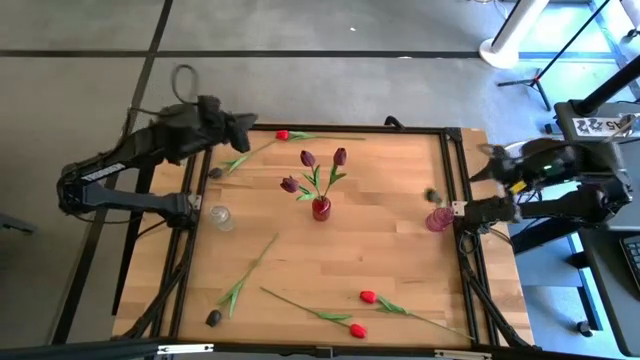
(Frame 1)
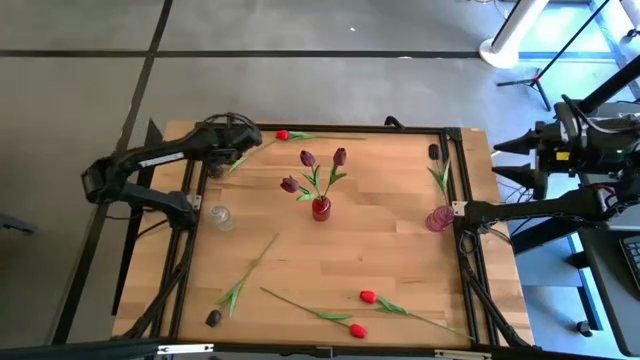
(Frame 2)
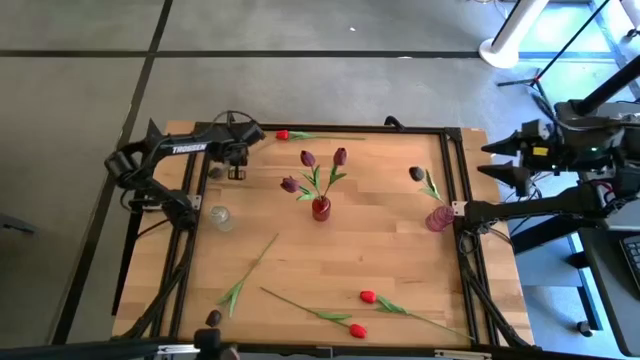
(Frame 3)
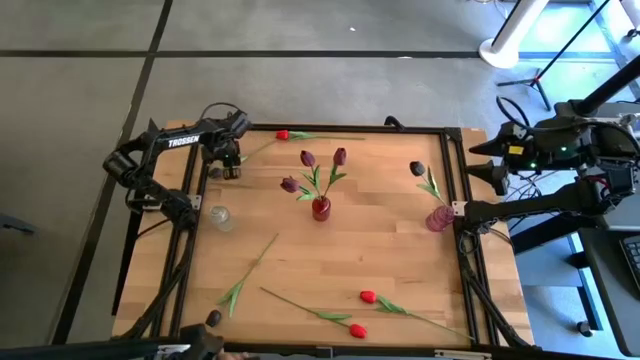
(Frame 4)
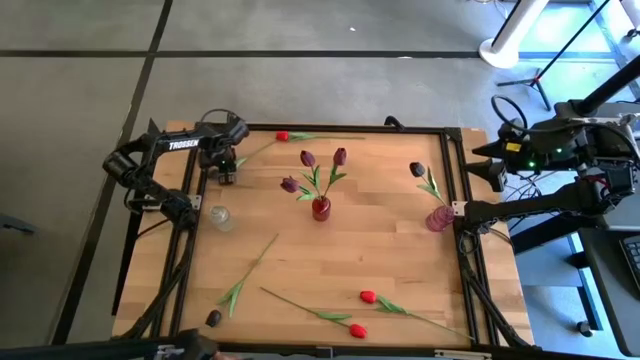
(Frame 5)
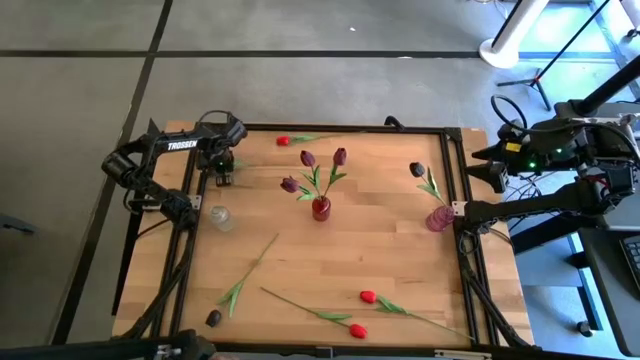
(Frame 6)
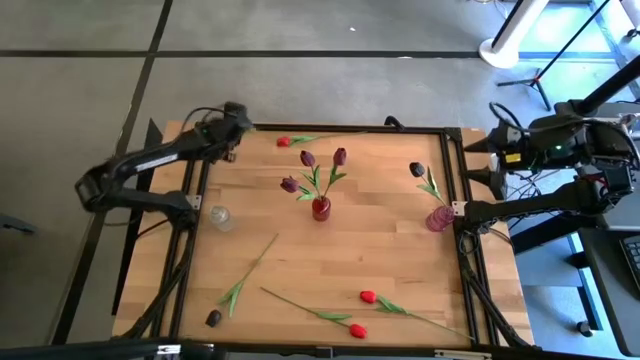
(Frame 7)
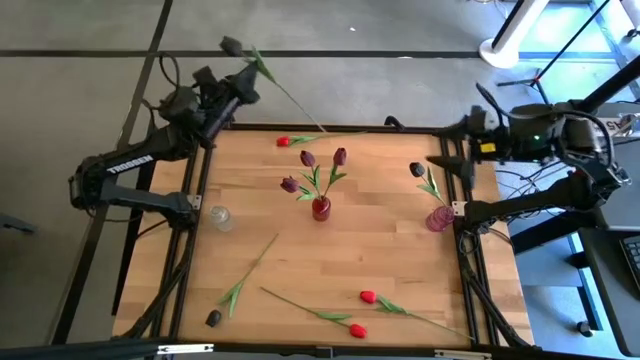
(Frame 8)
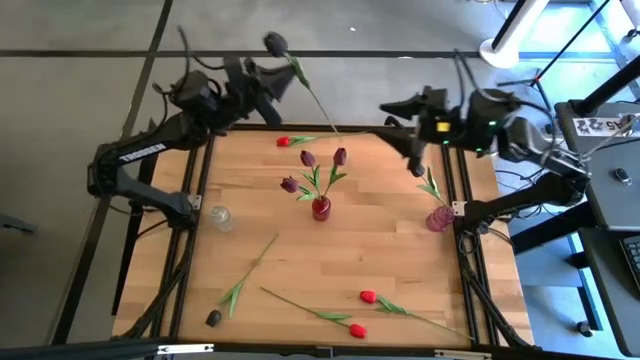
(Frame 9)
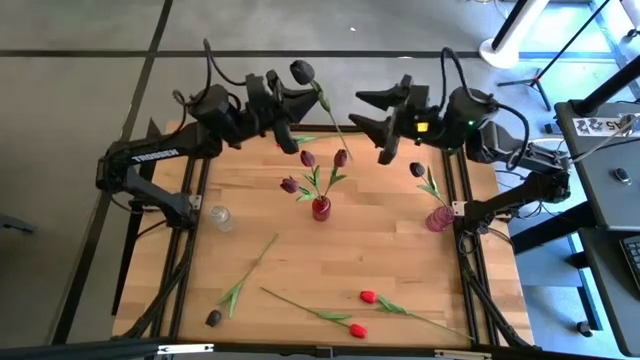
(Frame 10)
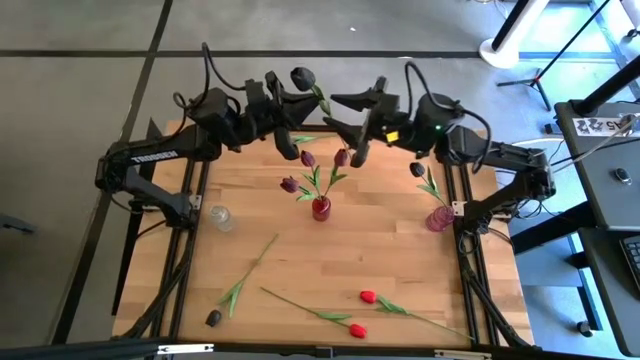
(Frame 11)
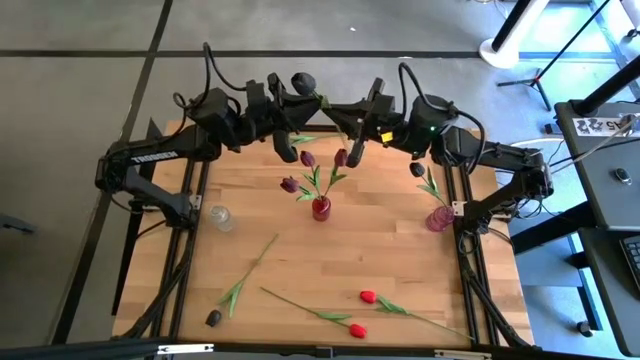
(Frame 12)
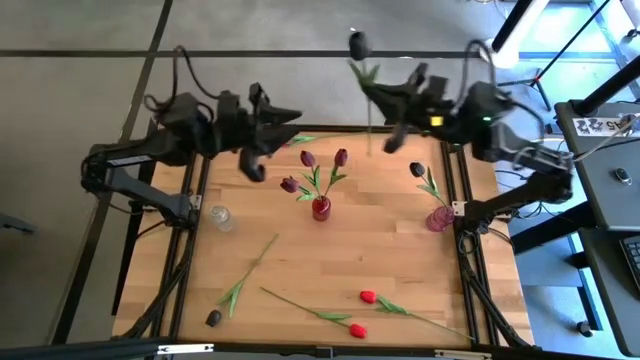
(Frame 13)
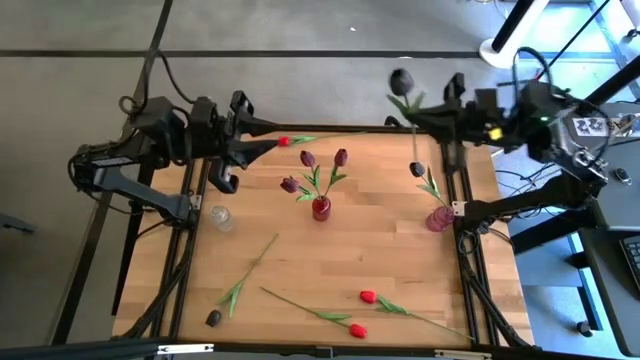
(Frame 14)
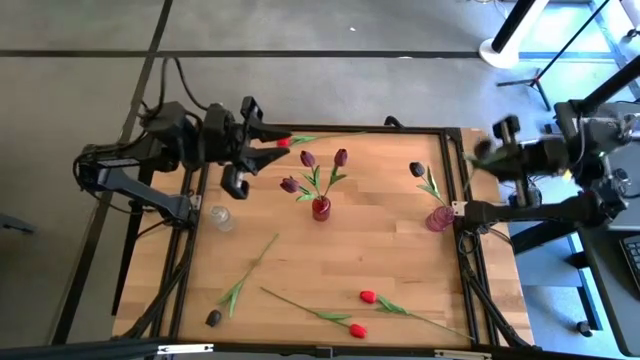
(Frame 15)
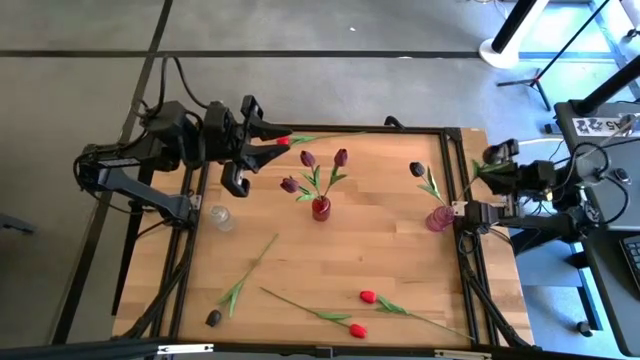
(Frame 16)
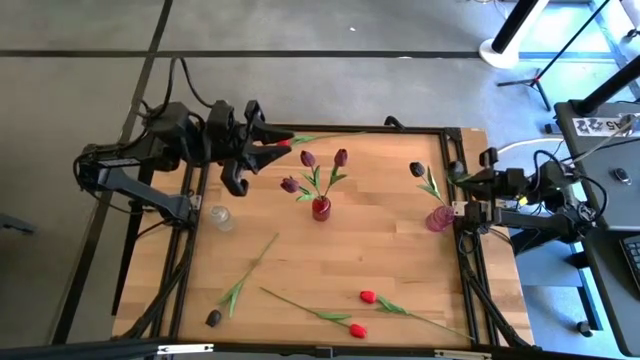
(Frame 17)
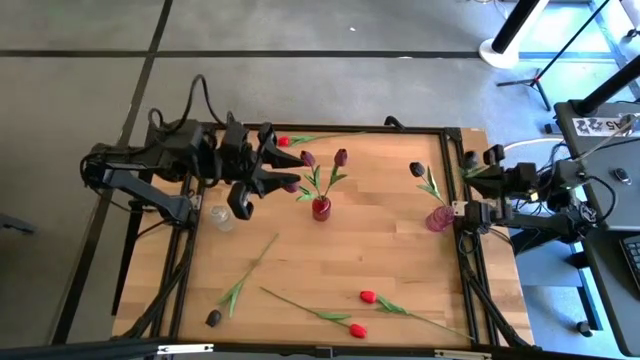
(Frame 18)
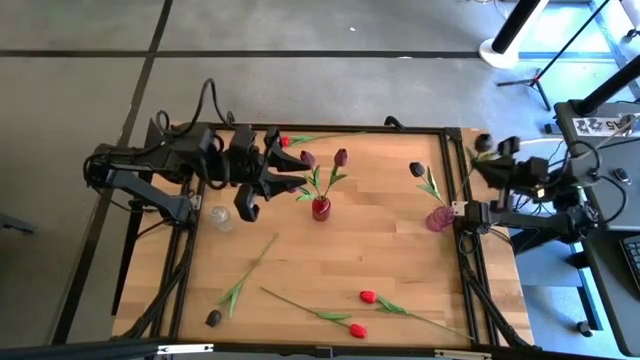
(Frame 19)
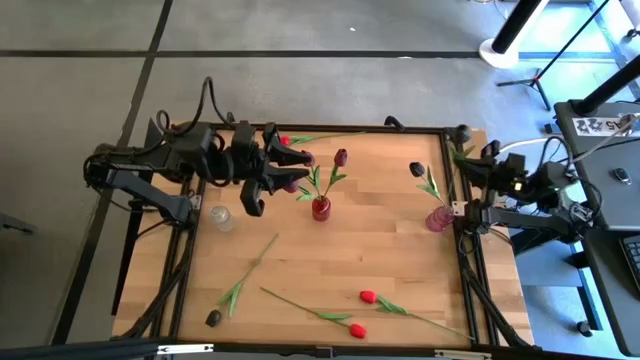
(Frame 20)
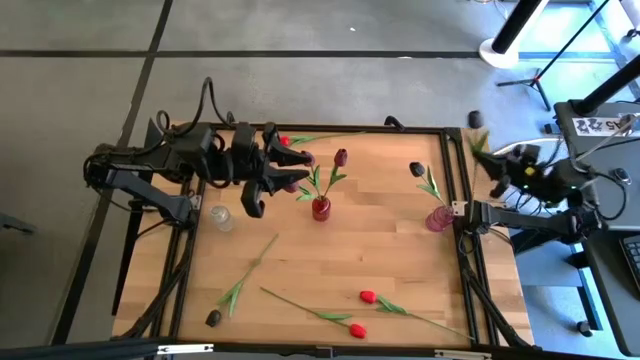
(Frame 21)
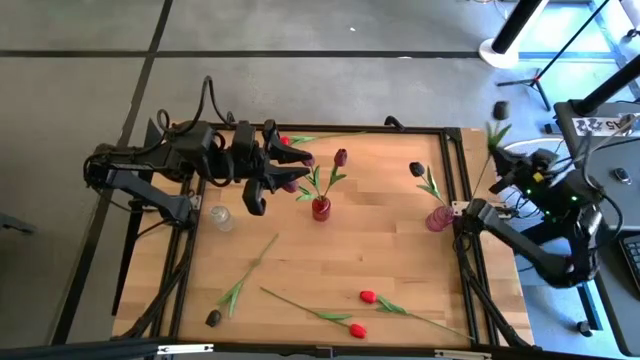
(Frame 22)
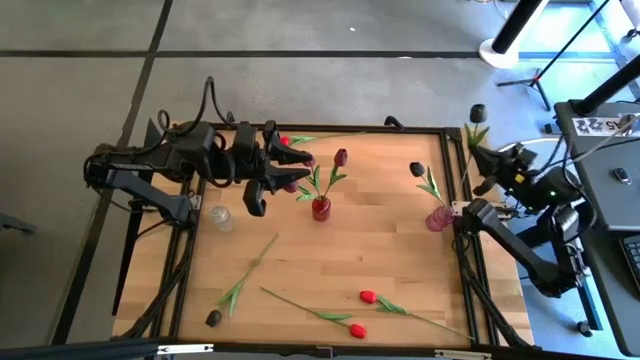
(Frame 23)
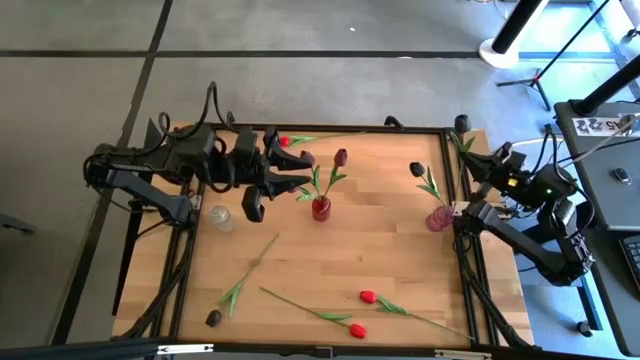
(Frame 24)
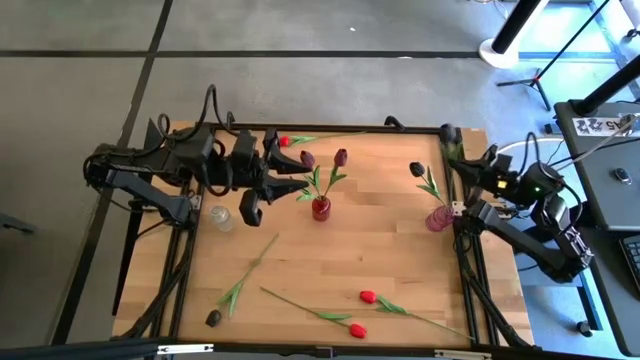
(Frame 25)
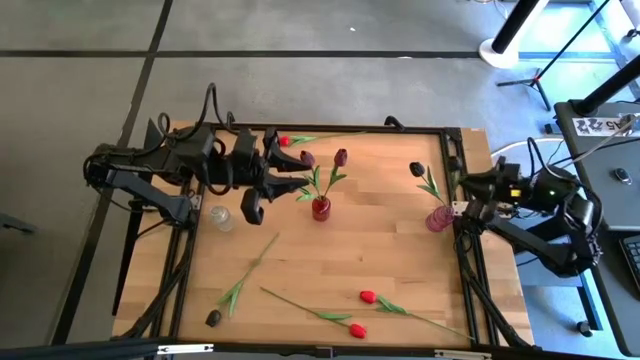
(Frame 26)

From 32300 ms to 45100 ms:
Task: Sort flowers into vase by color
Put the top black tulip into the pink vase

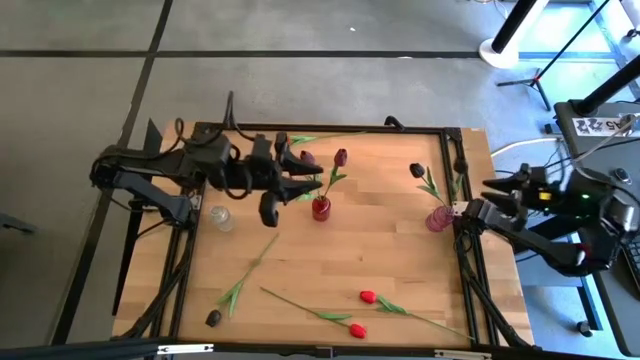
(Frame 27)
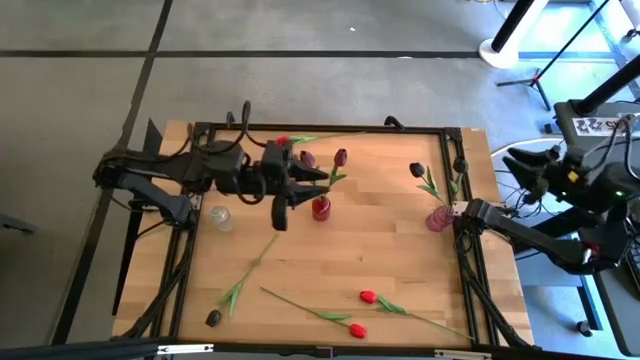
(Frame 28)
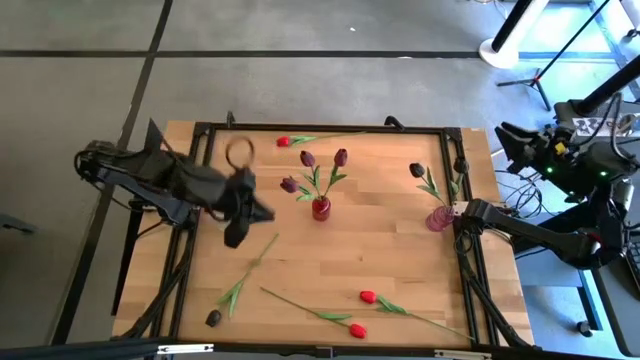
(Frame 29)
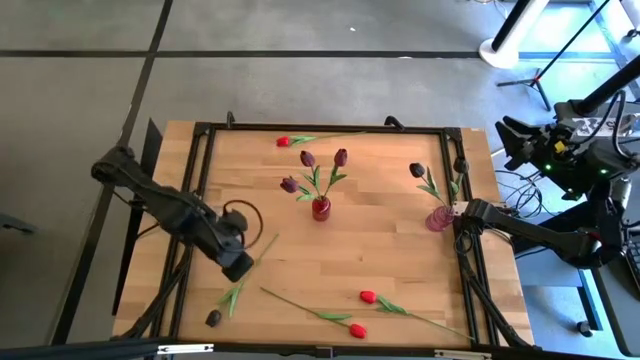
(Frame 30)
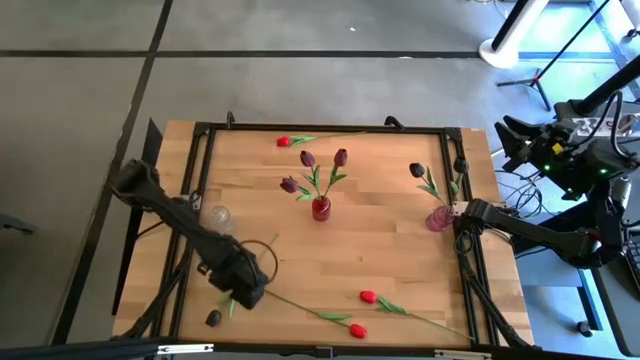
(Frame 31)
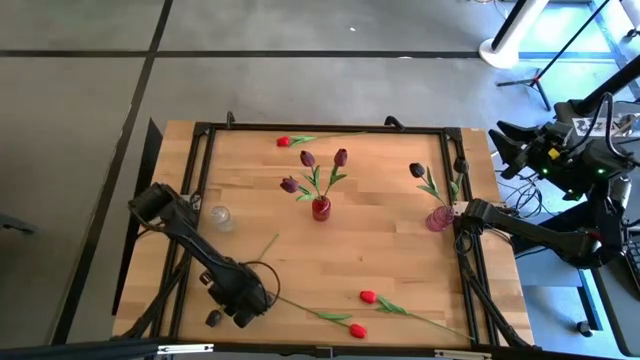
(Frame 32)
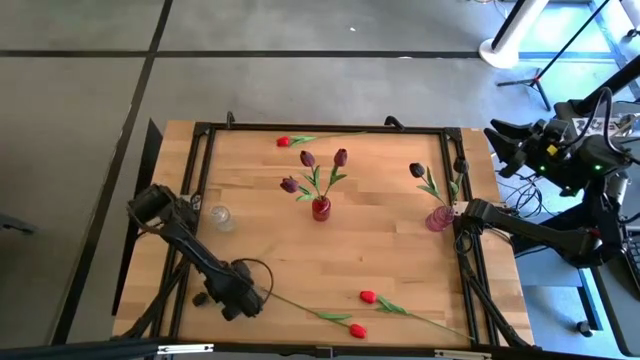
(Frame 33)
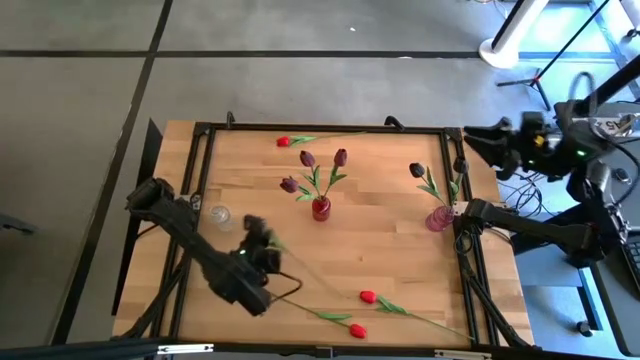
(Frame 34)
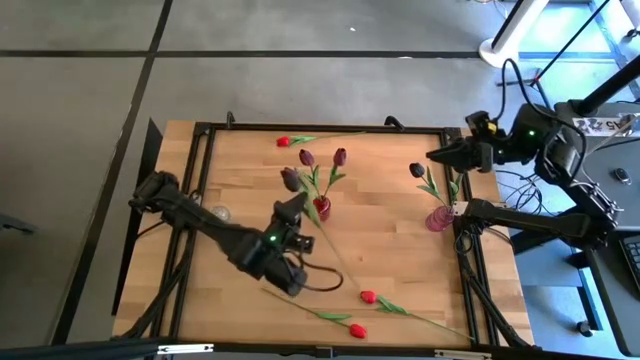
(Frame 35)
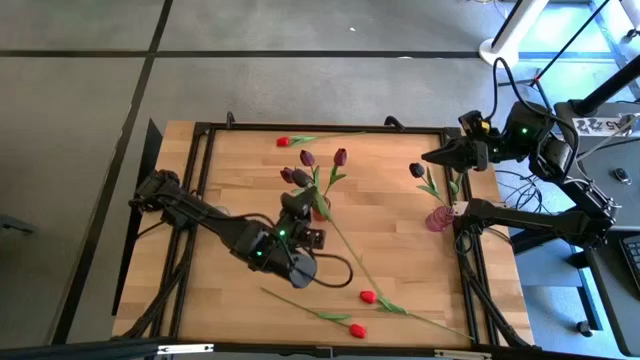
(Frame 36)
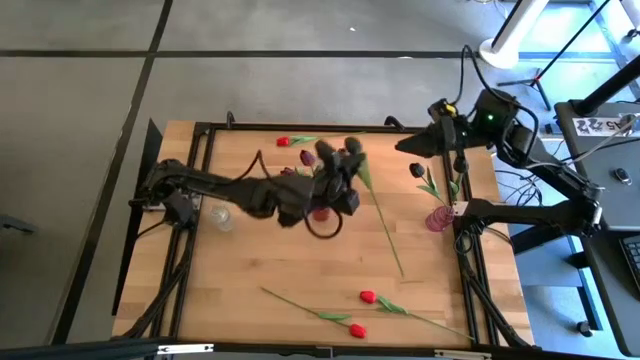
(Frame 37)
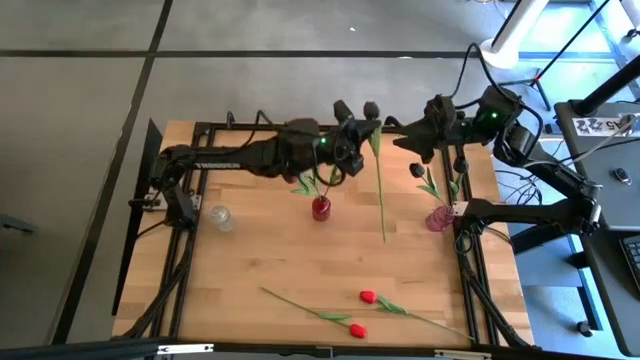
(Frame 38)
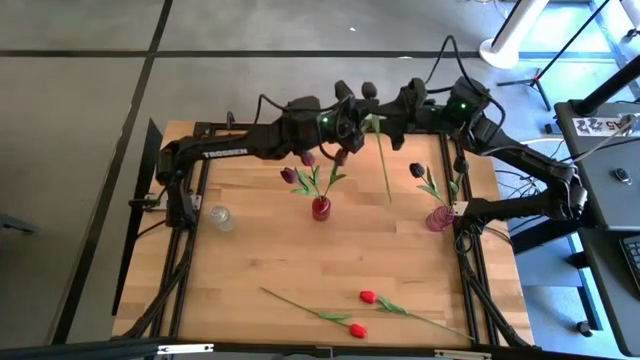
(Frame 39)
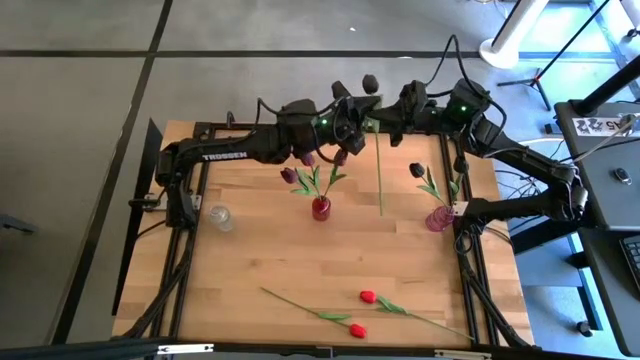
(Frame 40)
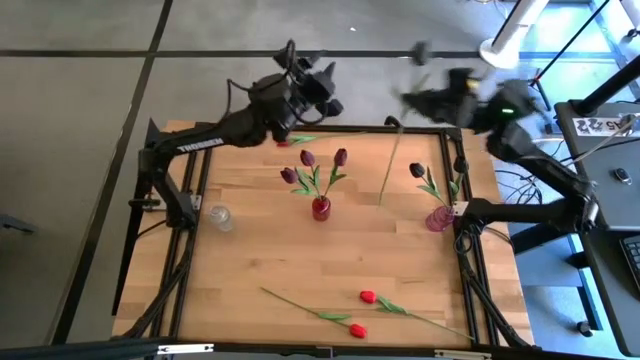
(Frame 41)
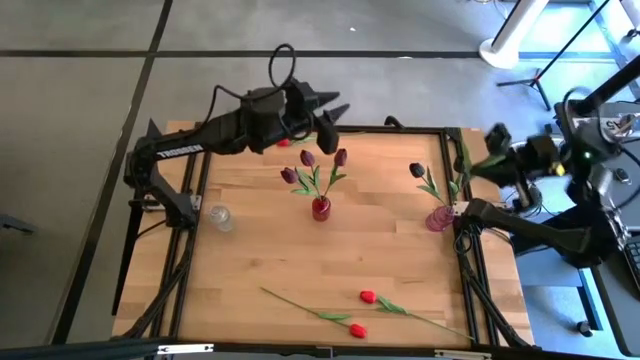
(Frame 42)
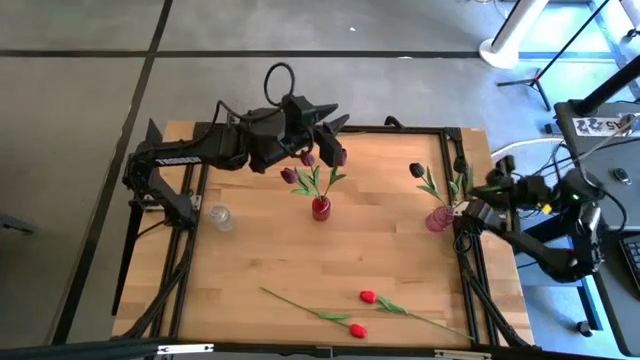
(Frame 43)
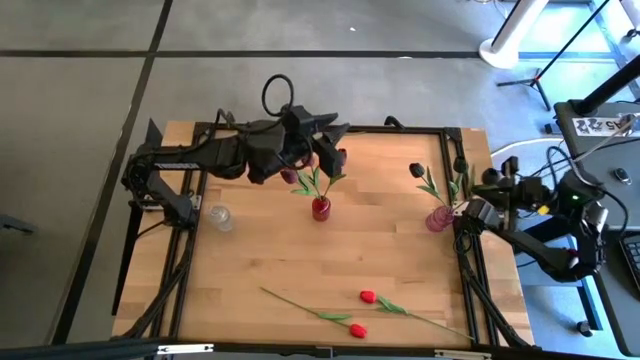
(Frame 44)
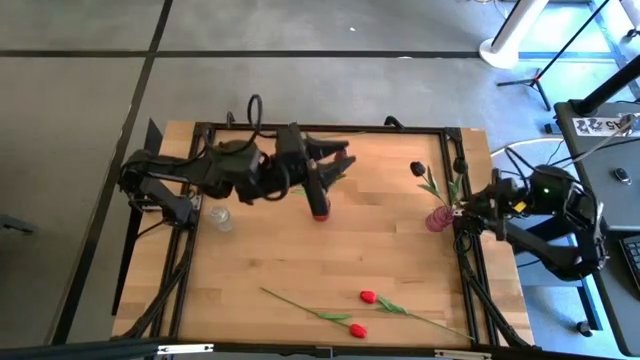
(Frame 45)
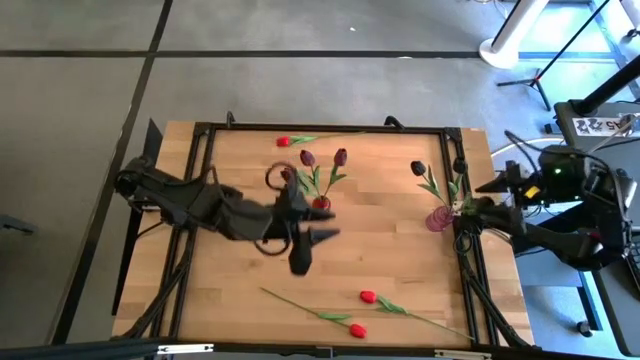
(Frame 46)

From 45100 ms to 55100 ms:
Put the black tulip into the pink vase
